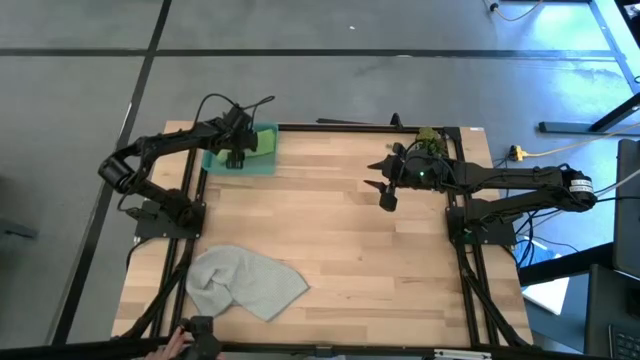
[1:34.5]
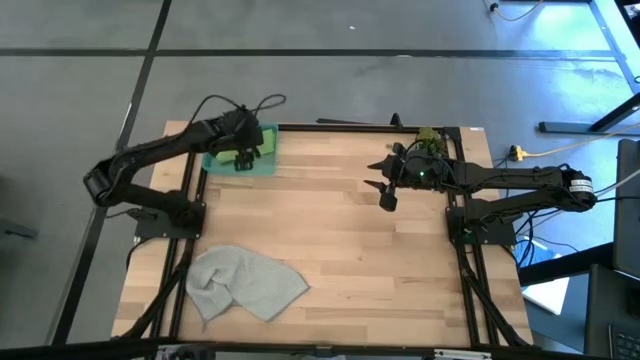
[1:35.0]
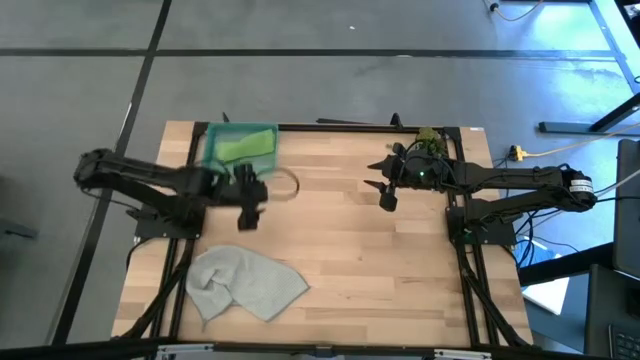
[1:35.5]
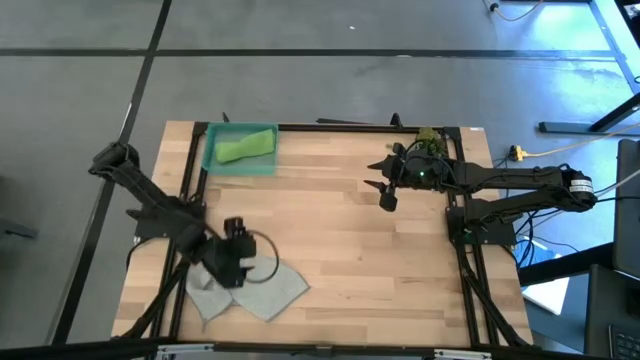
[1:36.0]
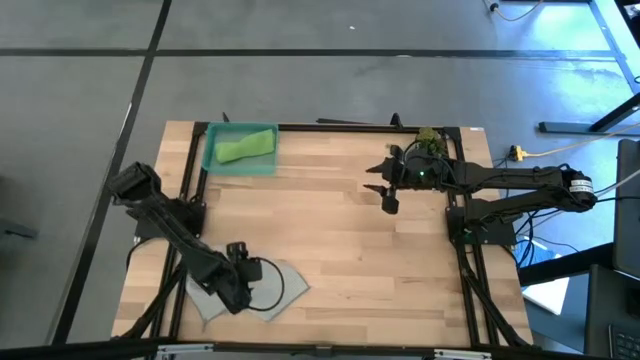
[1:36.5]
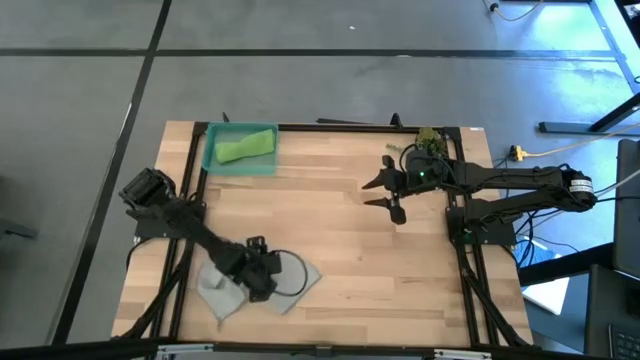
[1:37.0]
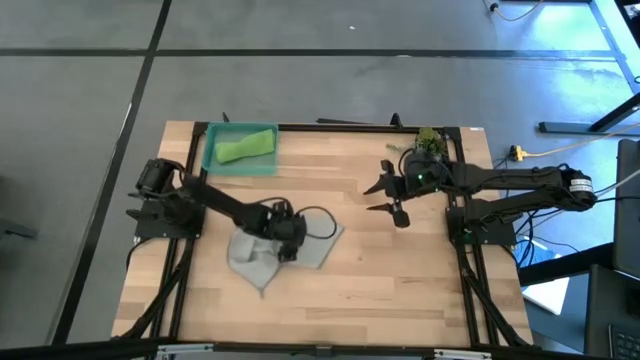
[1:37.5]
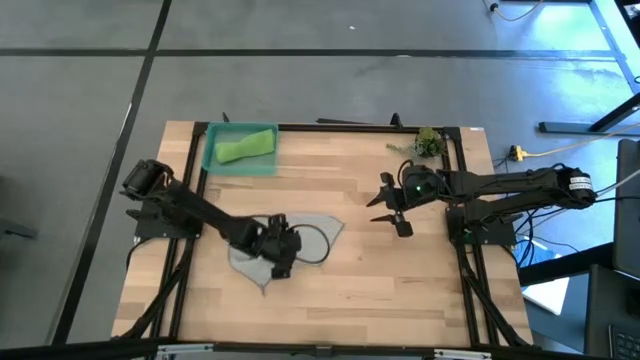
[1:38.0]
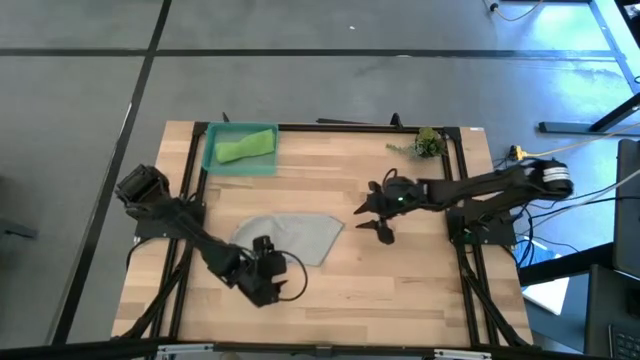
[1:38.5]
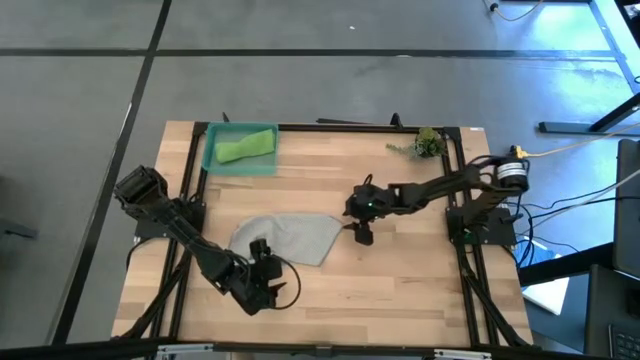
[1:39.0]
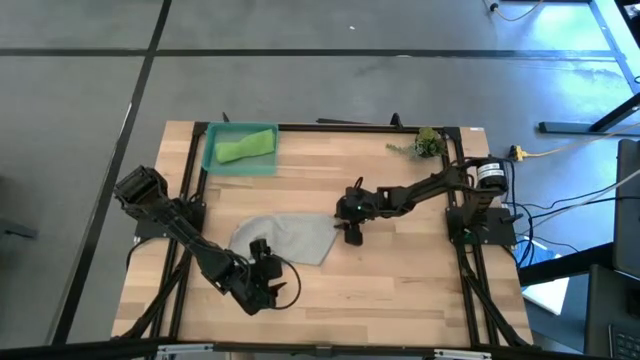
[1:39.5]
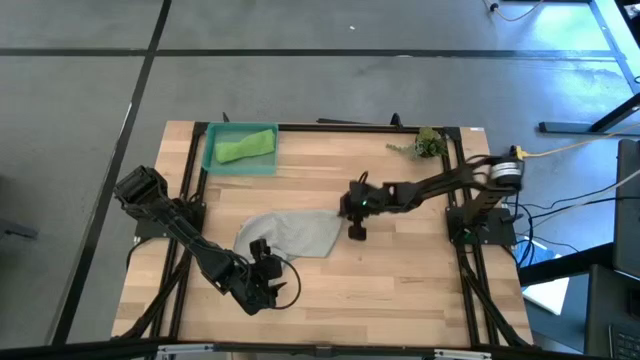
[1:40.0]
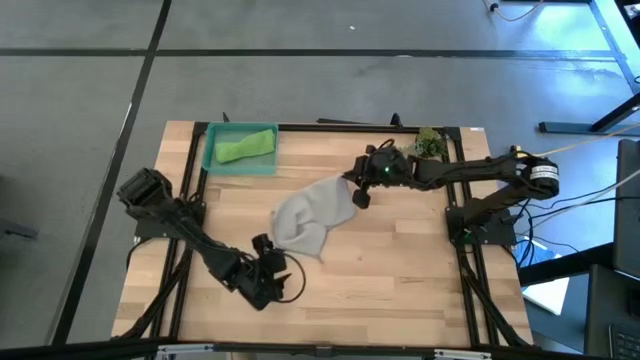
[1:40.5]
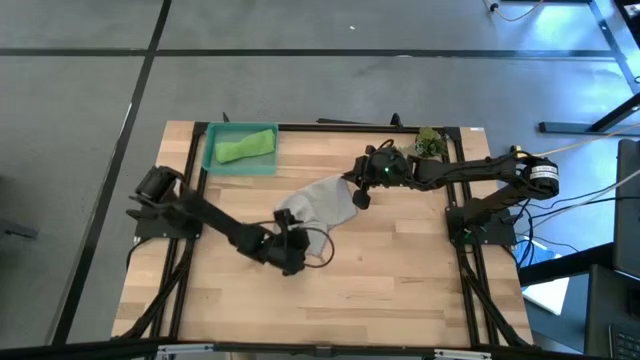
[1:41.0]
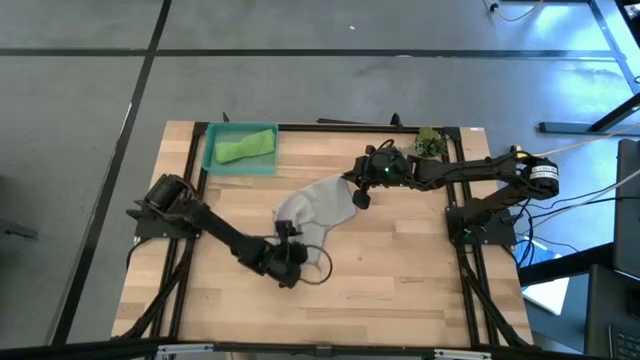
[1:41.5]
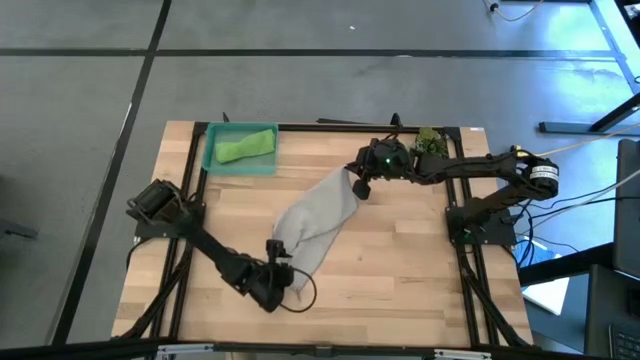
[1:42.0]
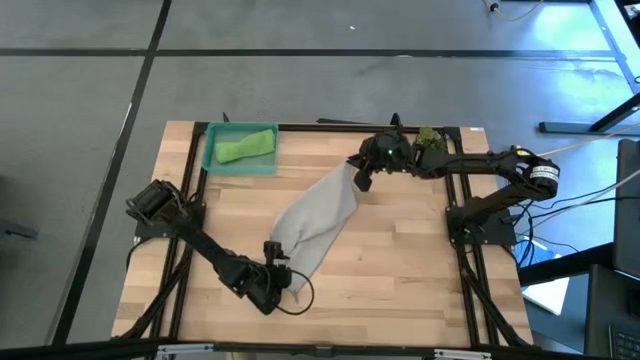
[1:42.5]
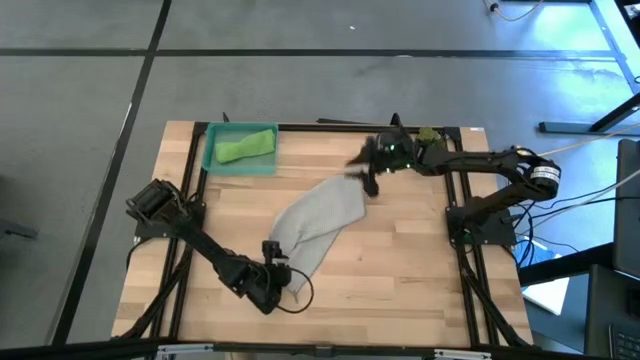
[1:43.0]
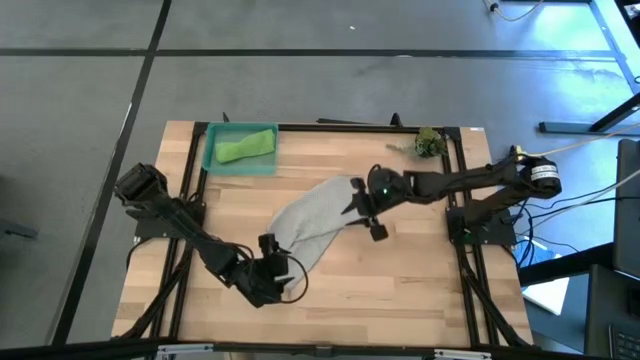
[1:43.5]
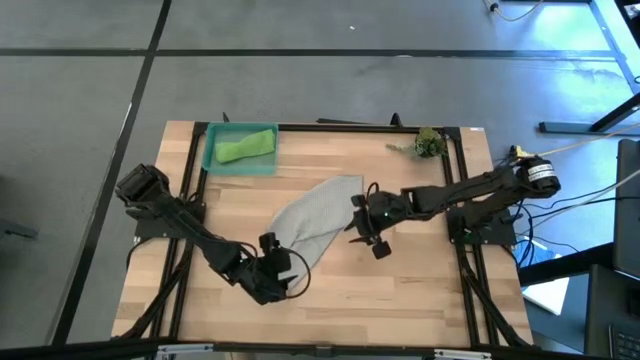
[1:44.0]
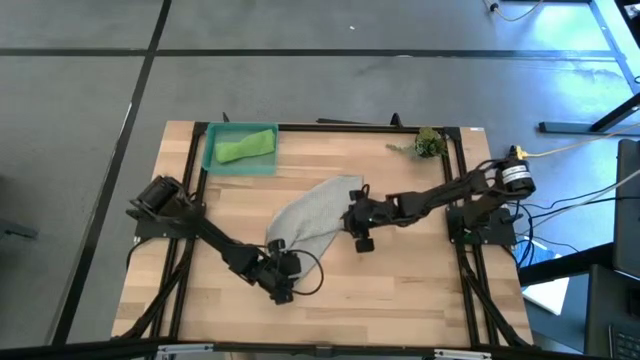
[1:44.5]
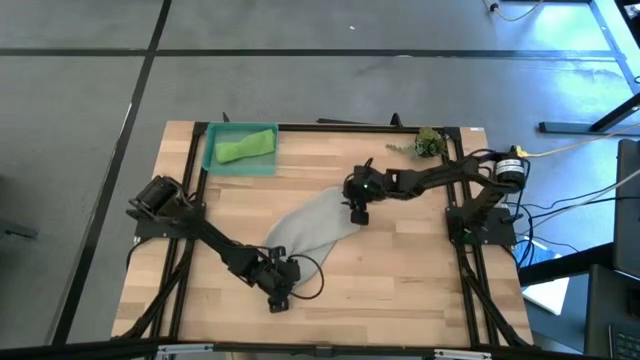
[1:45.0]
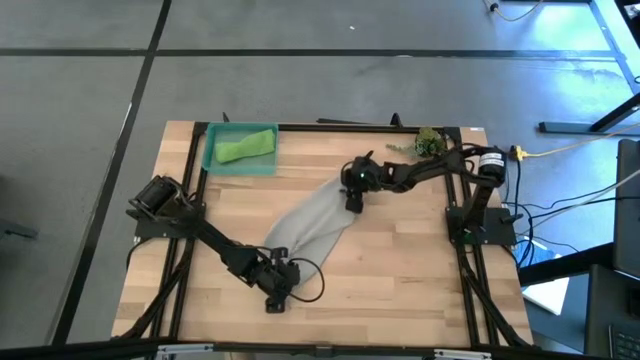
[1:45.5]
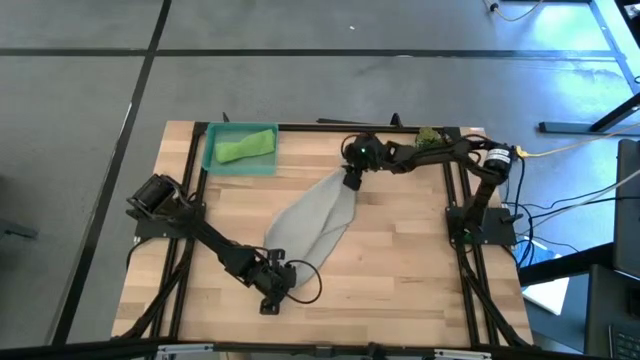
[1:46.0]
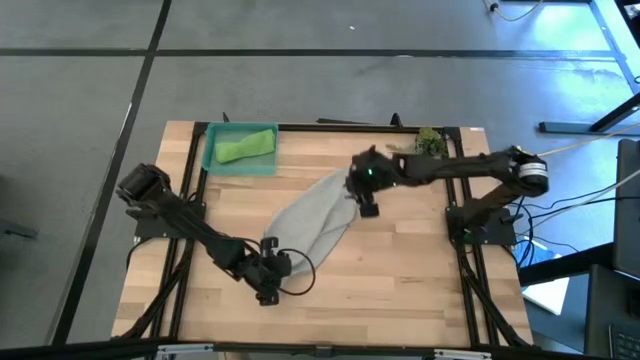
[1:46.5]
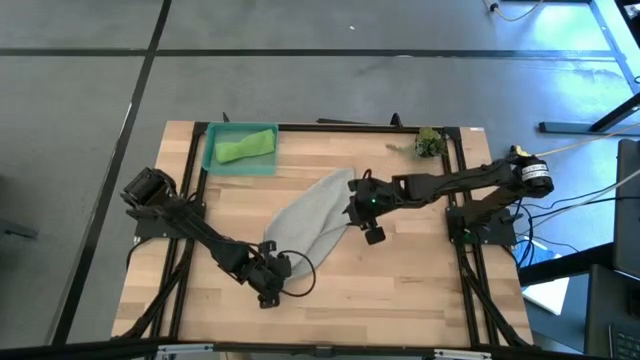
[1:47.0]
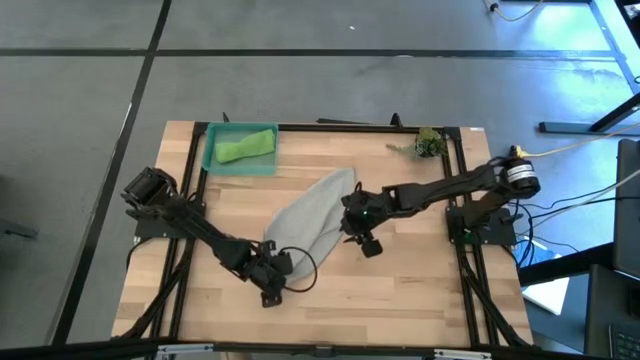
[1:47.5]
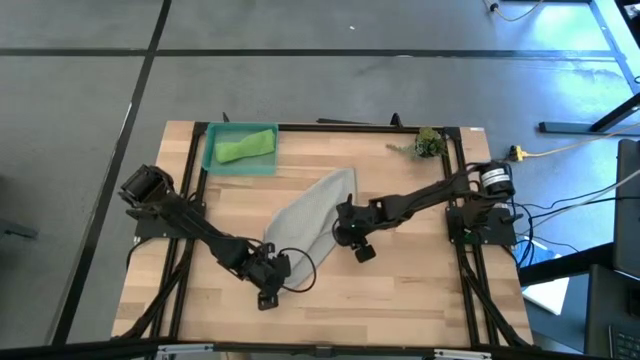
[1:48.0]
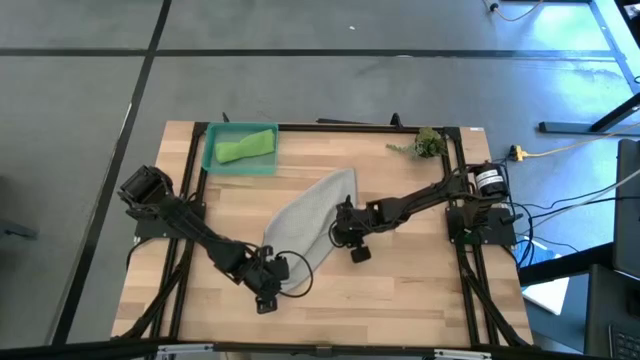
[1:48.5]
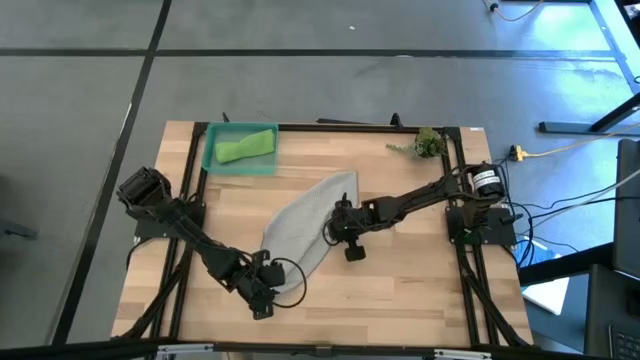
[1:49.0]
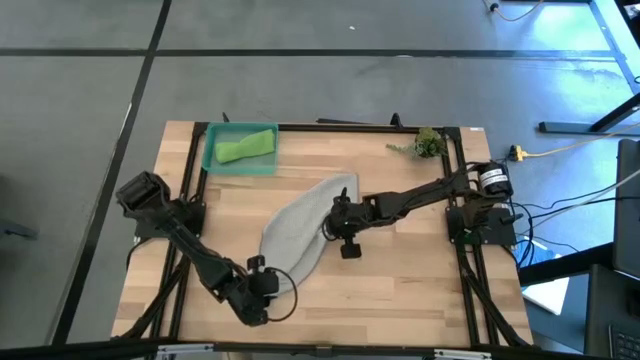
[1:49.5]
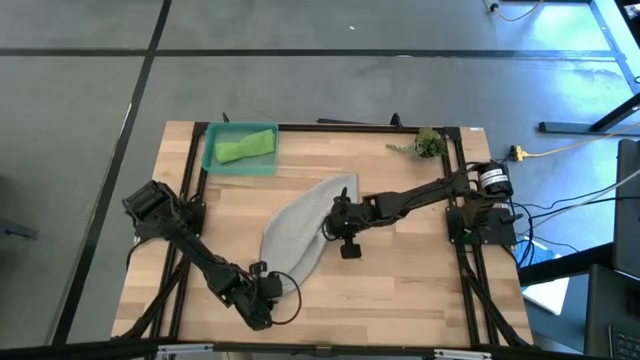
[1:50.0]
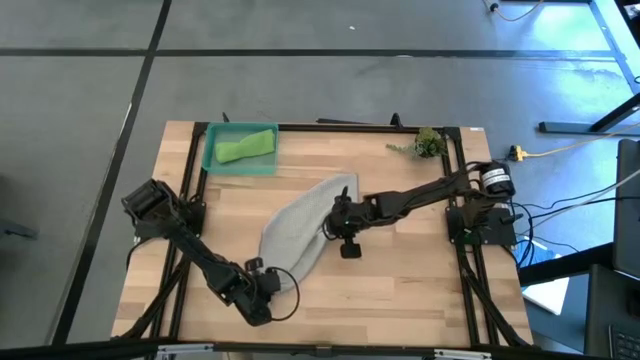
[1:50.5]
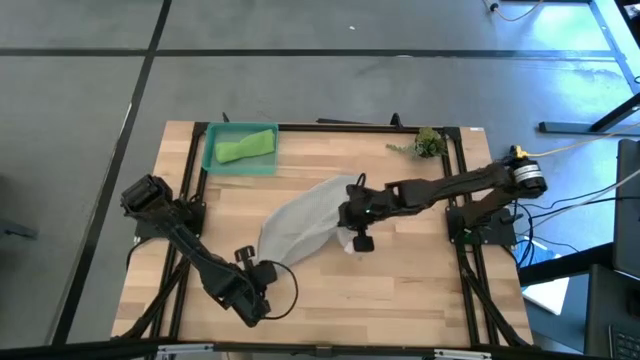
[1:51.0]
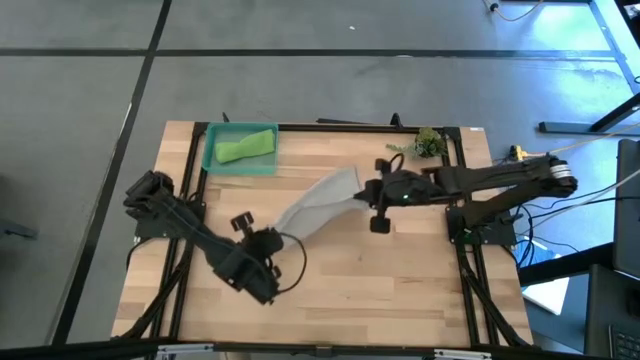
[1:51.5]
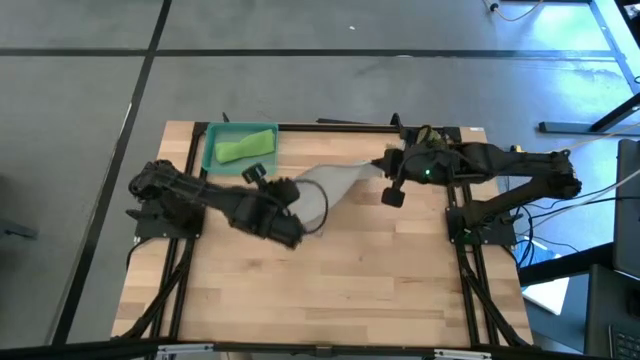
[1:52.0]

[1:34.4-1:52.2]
Task: Roll microfiber towels into tight, uniform cylinder then place into a basket
Roll the gray towel

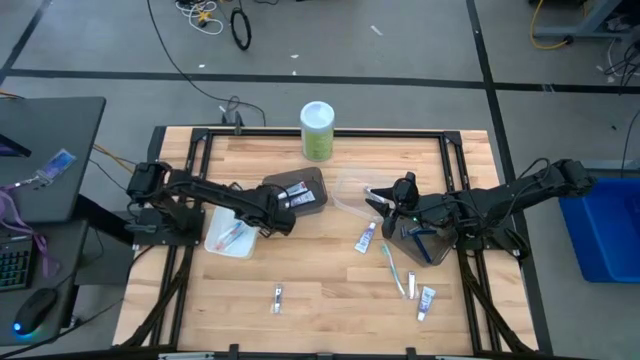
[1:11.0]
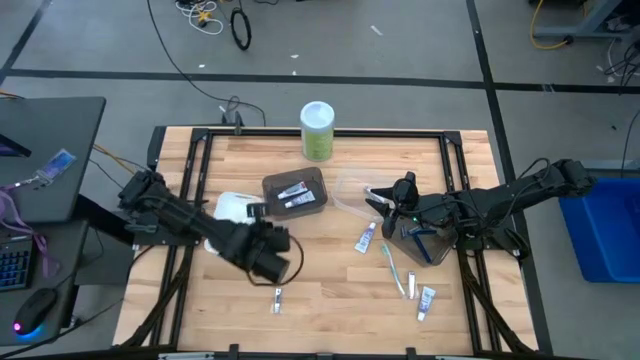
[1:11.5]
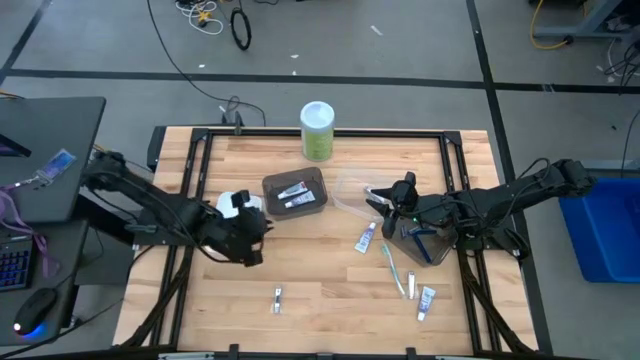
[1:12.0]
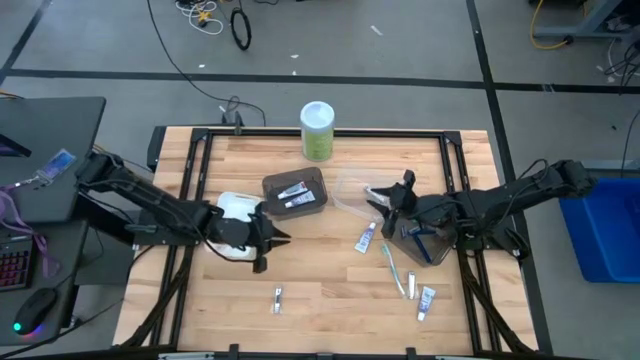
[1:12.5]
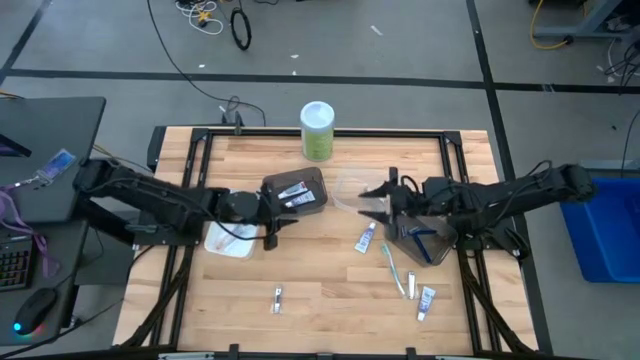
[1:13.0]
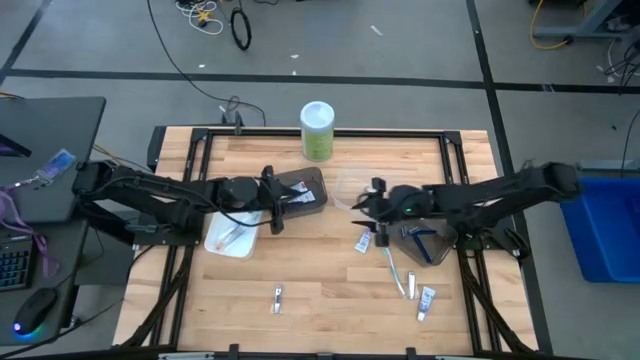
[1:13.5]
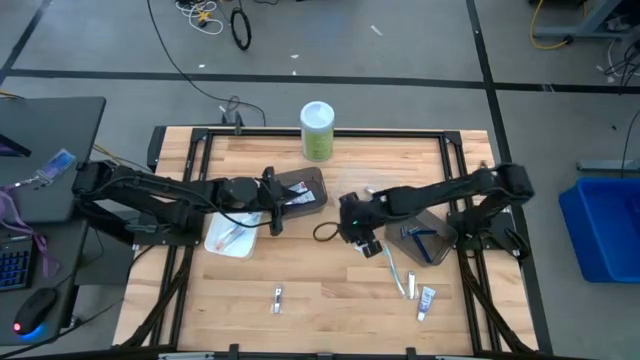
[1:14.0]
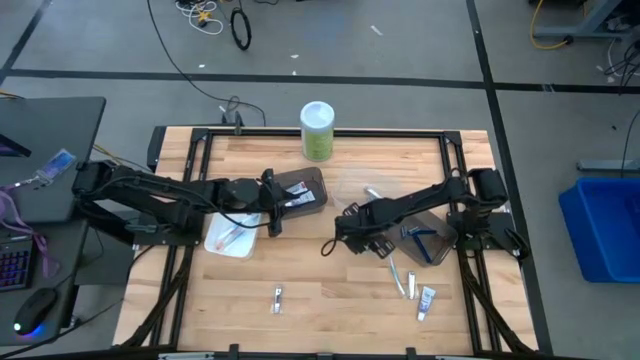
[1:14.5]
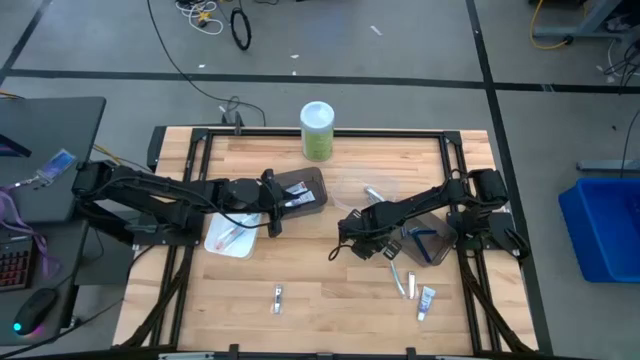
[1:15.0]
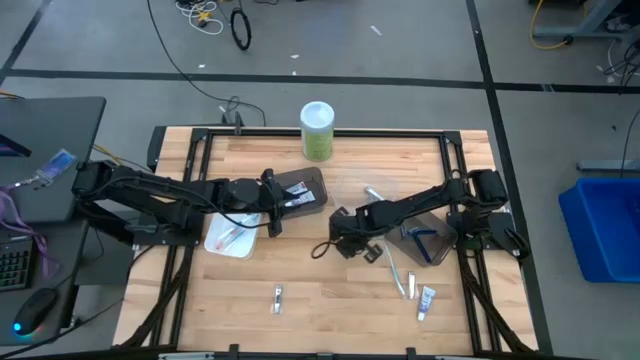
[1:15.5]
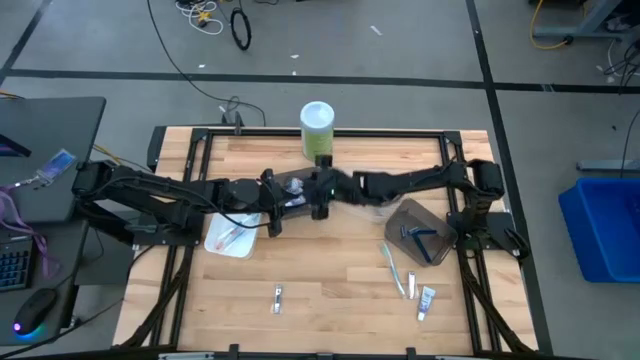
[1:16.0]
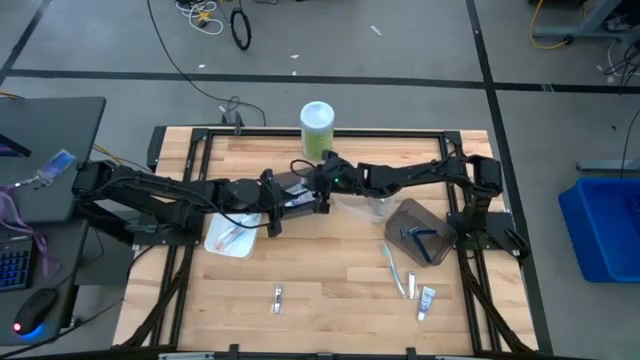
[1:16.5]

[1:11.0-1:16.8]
Task: Pick & Place Travel size toiletries
Put the toothpaste into the left black bin
